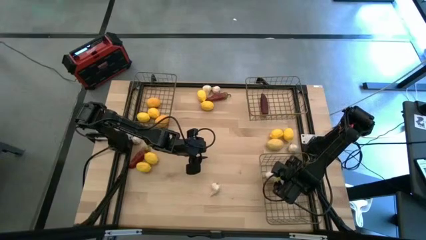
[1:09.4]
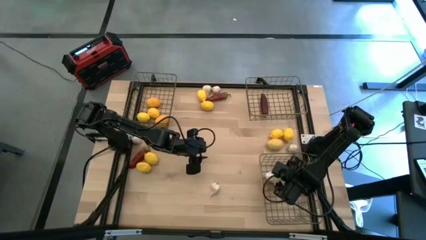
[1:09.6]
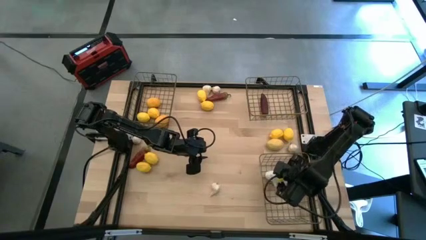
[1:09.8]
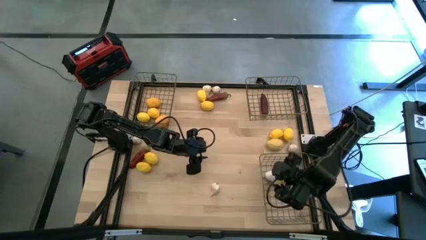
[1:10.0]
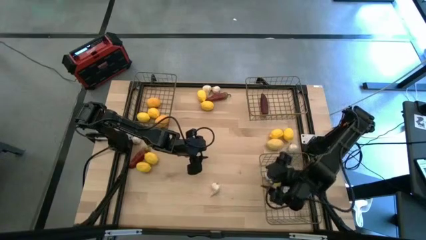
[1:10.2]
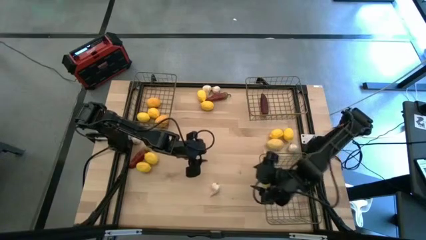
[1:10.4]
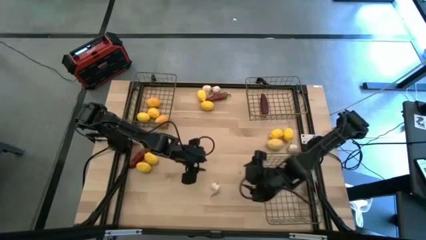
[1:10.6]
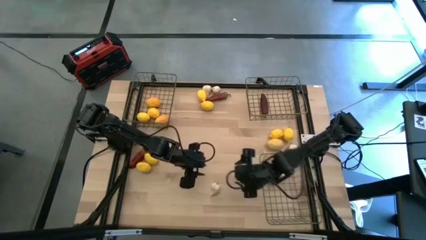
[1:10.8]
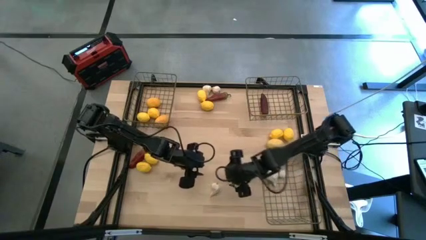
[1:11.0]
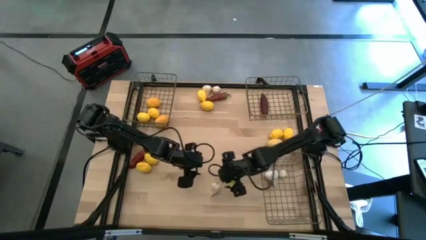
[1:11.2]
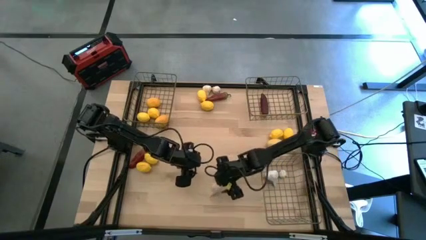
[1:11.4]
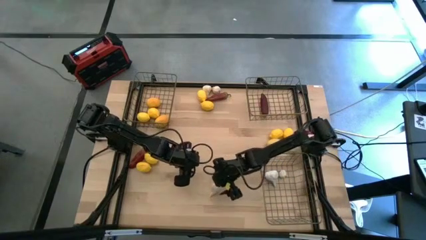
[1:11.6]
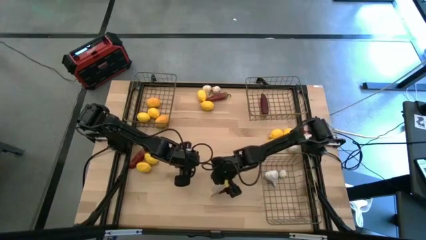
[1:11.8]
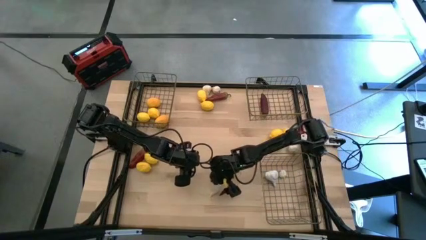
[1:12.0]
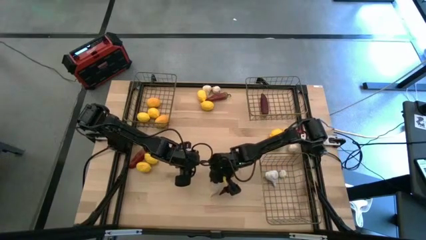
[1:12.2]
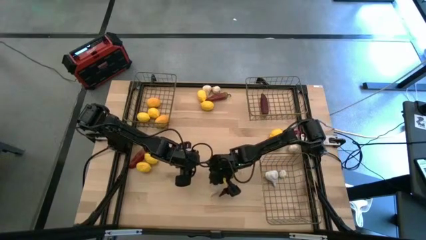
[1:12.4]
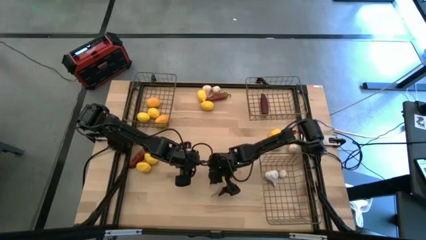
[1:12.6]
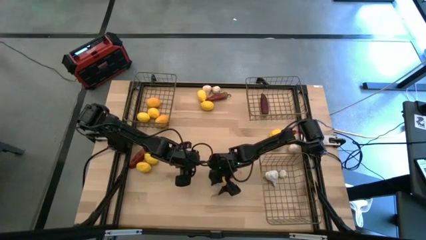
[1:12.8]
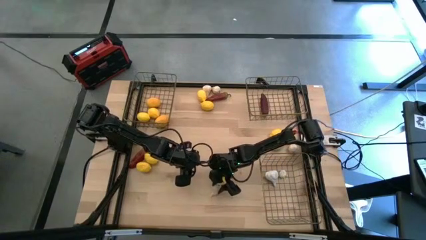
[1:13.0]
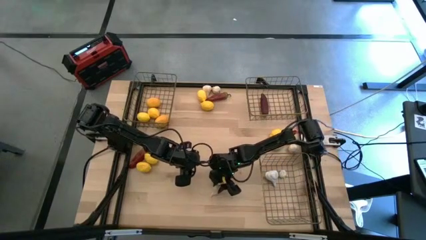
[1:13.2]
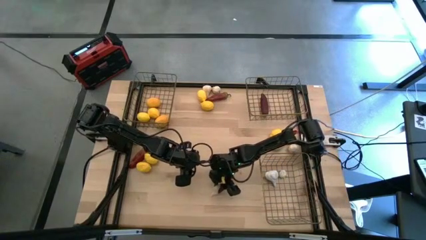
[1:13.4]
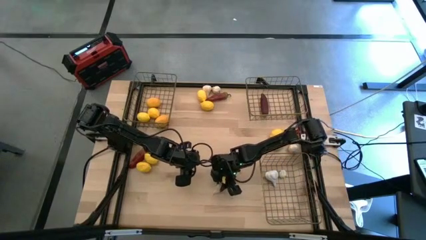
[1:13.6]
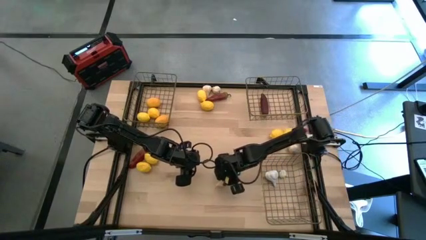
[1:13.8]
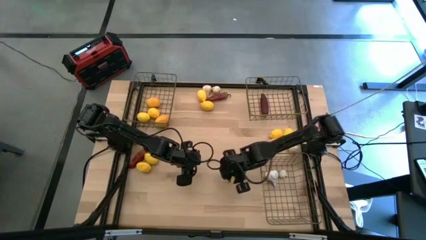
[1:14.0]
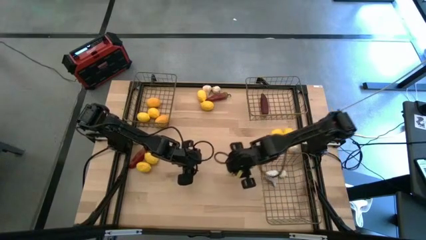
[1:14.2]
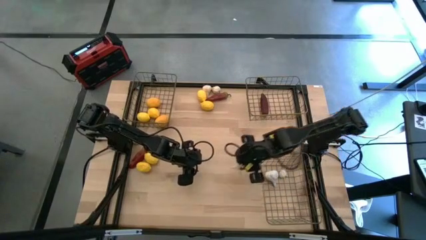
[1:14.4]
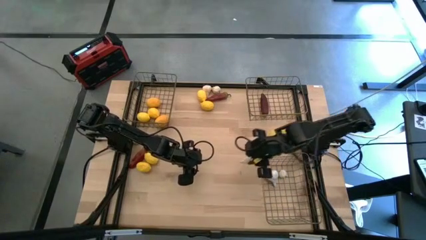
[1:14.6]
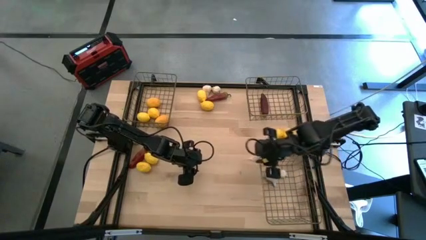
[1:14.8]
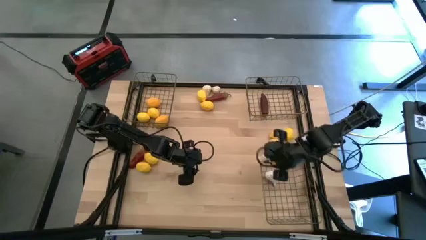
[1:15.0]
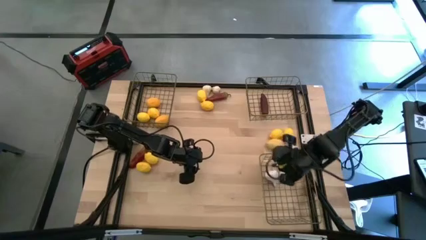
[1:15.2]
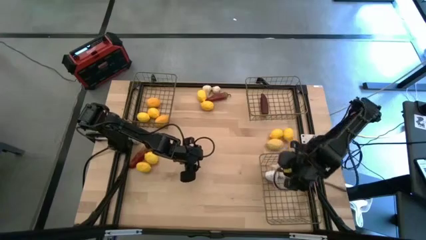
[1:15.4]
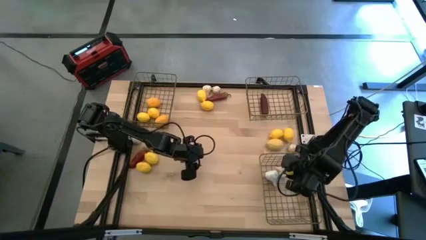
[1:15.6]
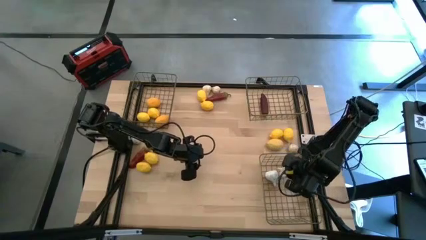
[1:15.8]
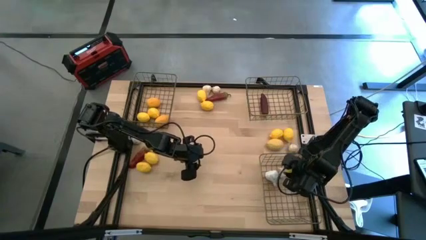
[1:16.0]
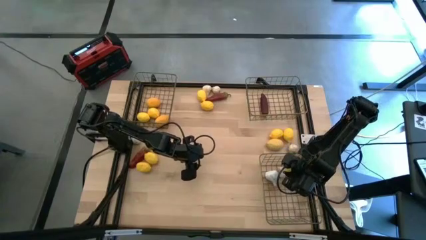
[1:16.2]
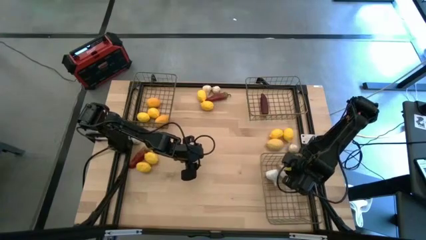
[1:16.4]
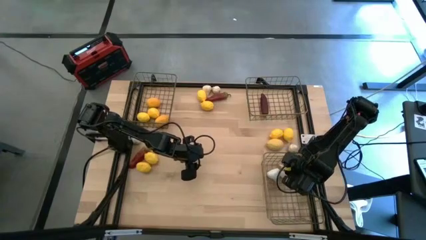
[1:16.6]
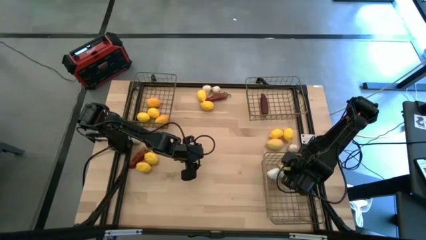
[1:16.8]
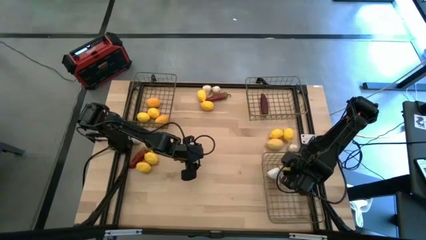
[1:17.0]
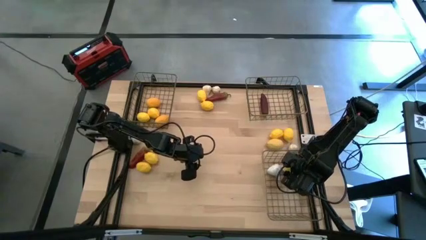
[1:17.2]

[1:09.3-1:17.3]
Task: Sort produce into baskets
Put the white garlic into the bottom wire basket

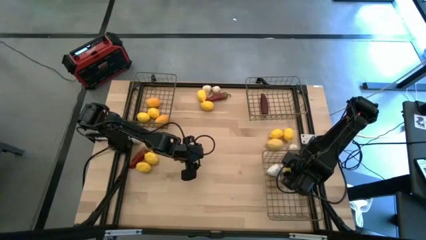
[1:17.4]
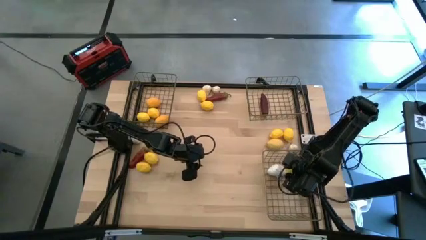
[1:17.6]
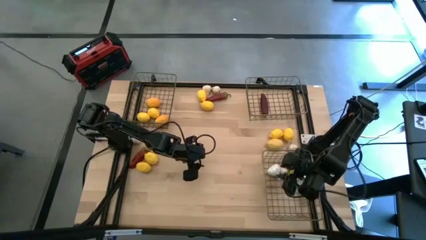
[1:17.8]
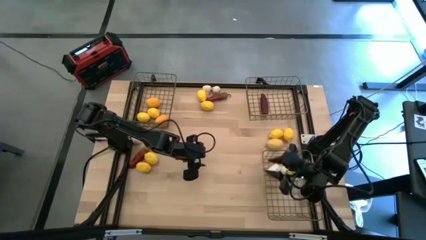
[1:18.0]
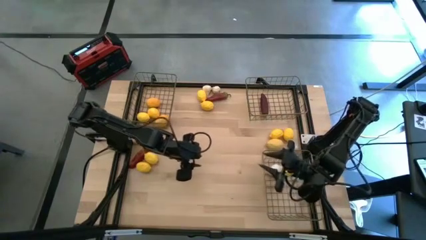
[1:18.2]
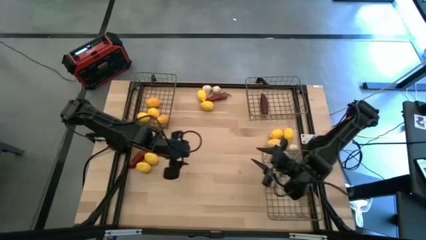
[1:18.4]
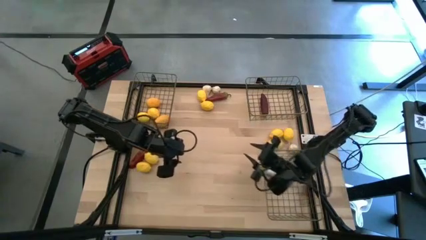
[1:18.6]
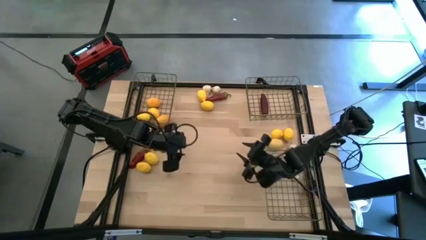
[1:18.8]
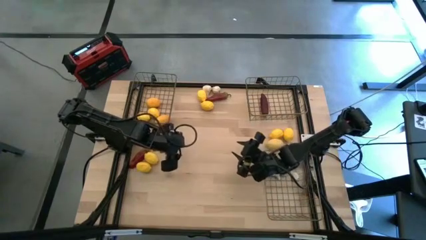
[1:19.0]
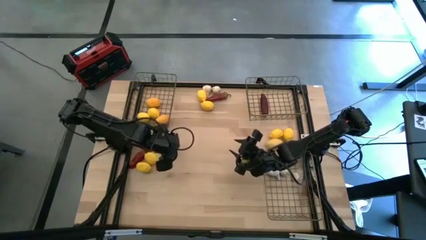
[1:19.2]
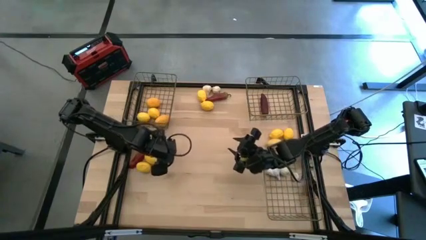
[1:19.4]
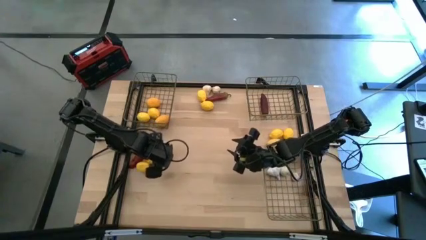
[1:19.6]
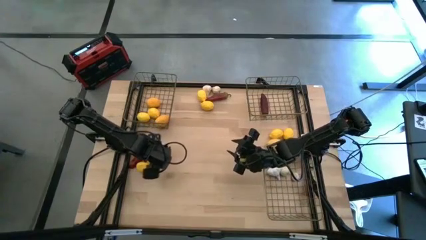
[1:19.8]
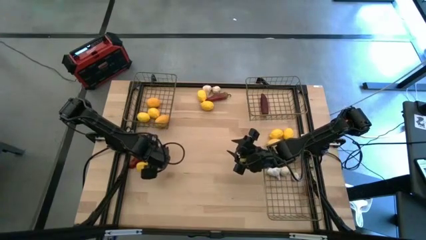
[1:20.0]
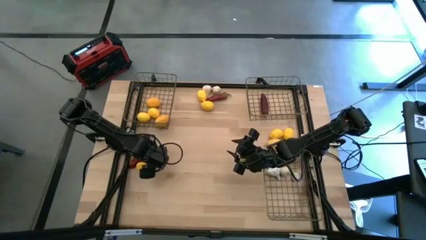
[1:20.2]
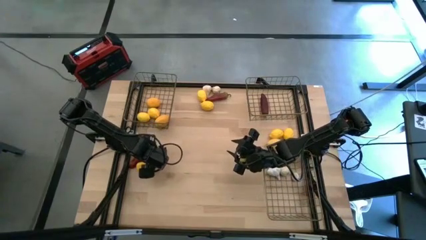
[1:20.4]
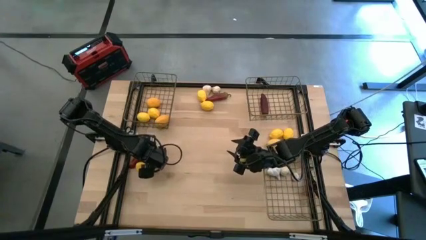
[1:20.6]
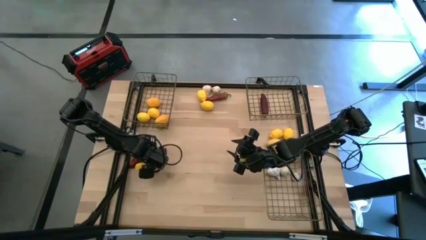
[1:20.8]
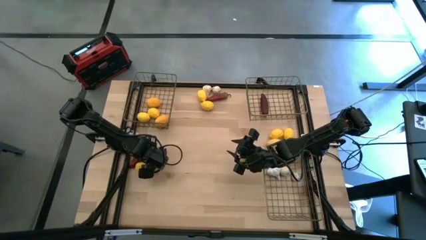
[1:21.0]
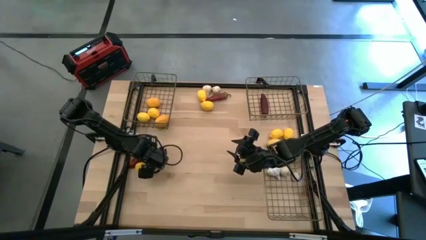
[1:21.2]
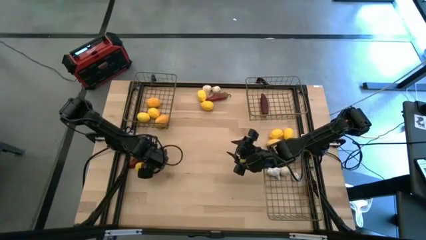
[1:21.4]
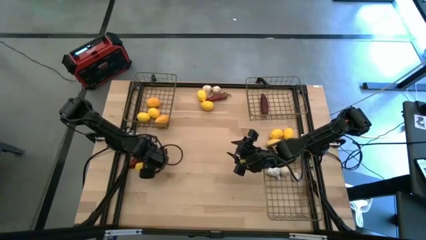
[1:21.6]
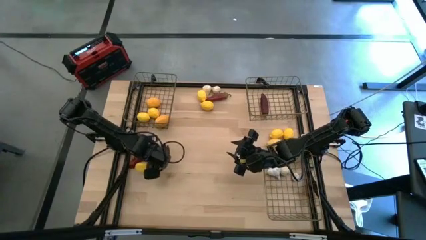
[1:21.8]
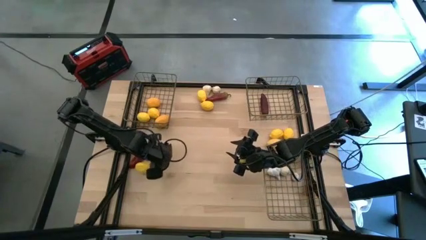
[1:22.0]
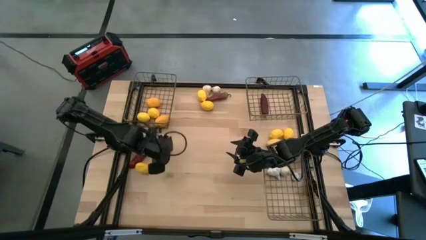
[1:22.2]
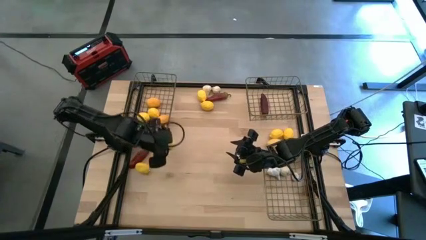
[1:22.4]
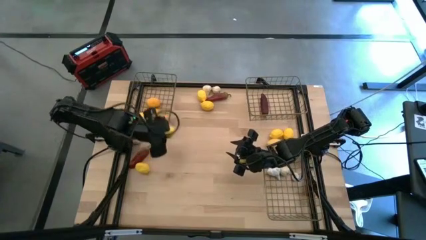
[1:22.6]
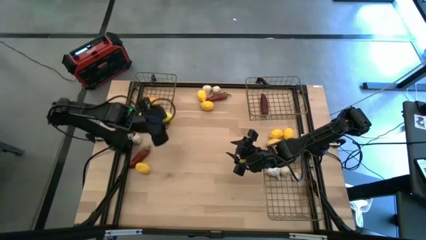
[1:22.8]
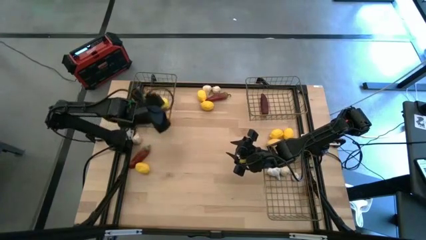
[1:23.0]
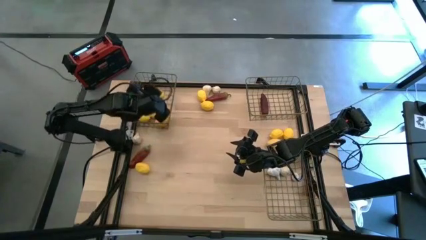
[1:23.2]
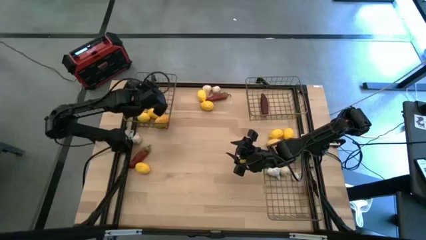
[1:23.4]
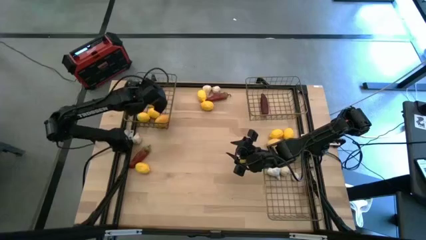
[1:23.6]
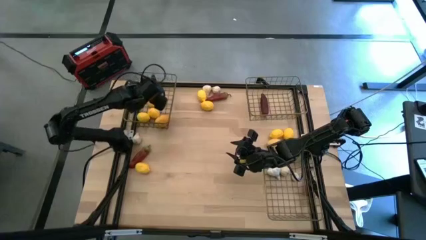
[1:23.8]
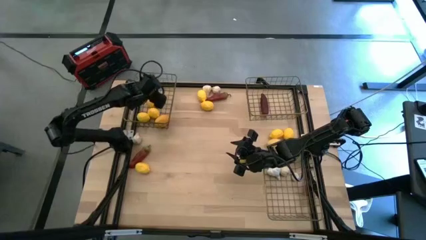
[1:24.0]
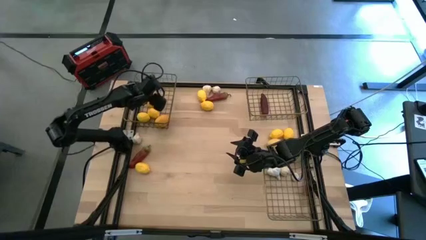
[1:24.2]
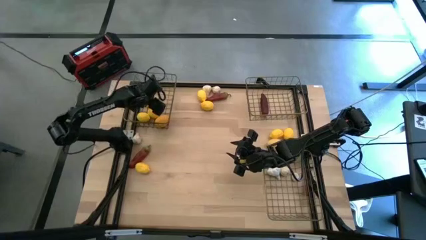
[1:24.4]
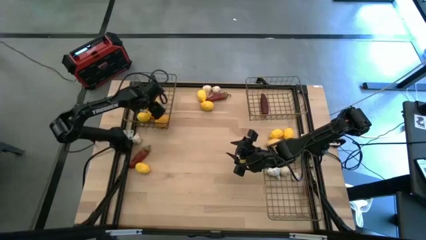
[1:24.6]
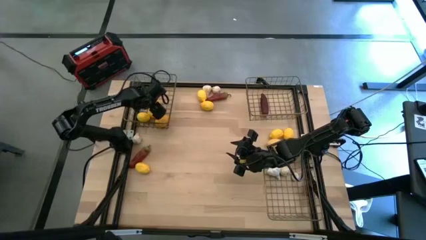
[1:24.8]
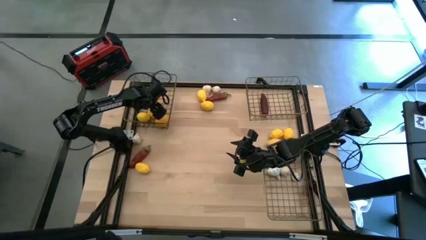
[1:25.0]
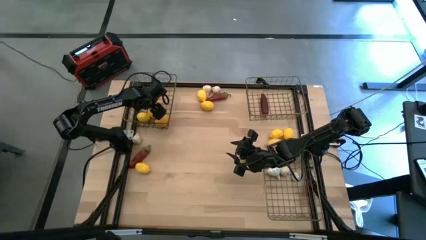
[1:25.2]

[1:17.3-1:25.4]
Put the yellow lemon into the top left wire basket
